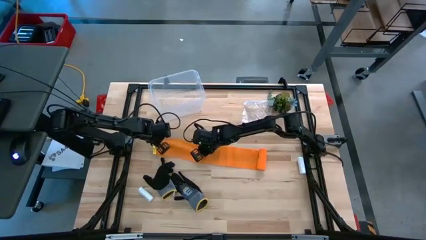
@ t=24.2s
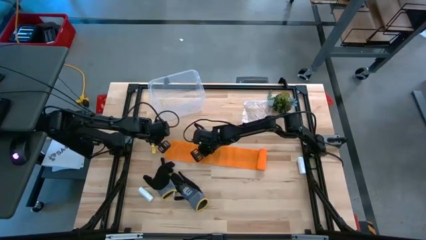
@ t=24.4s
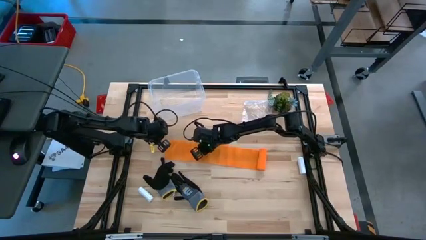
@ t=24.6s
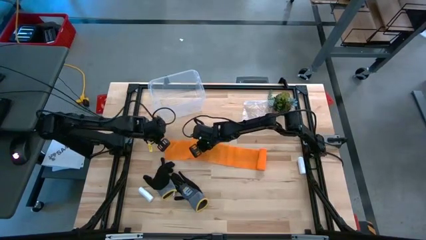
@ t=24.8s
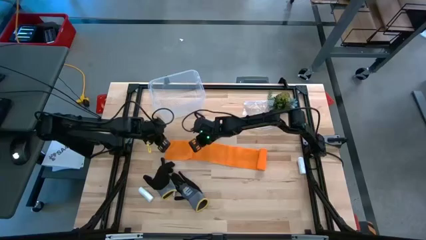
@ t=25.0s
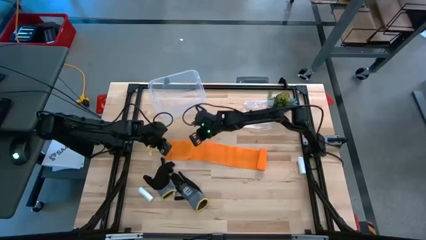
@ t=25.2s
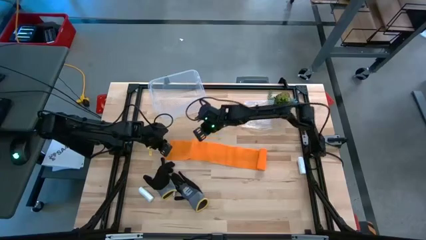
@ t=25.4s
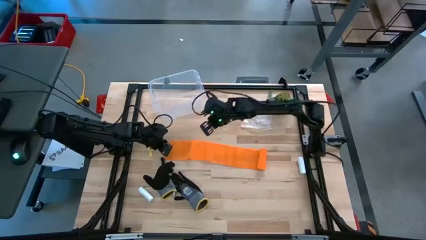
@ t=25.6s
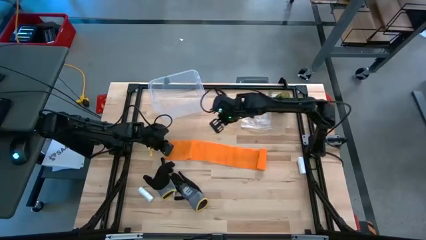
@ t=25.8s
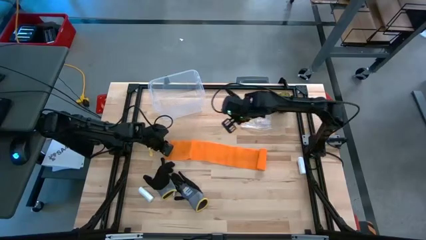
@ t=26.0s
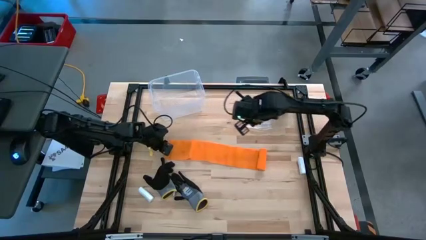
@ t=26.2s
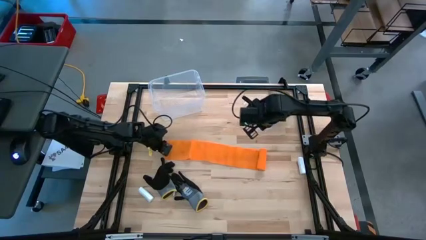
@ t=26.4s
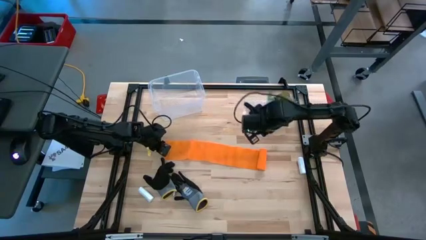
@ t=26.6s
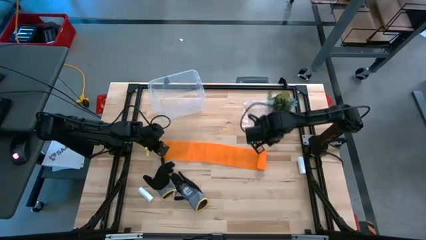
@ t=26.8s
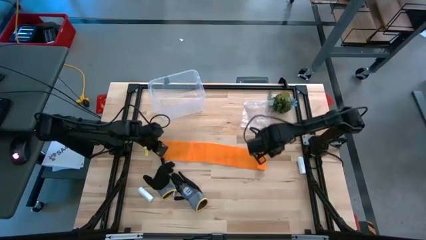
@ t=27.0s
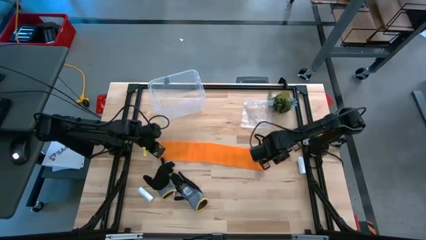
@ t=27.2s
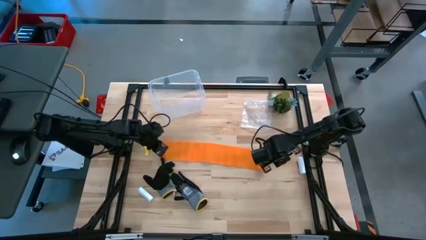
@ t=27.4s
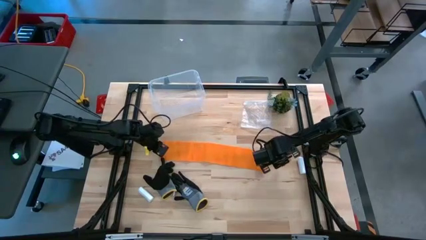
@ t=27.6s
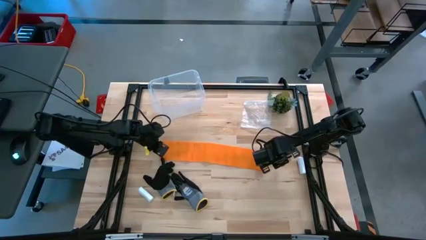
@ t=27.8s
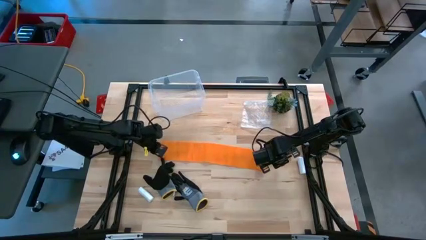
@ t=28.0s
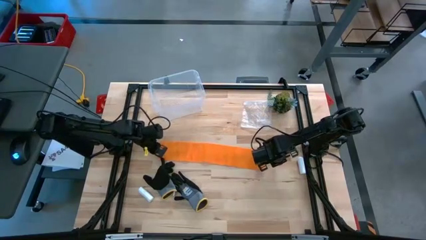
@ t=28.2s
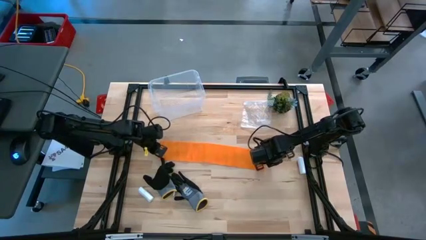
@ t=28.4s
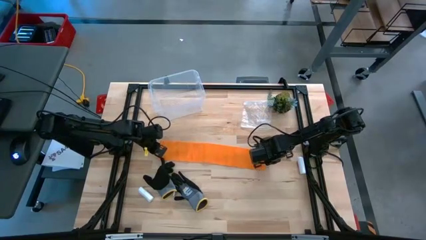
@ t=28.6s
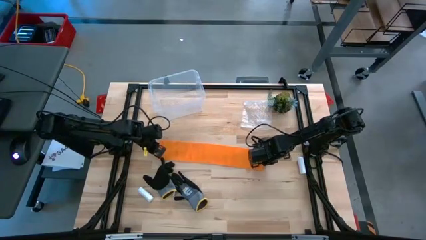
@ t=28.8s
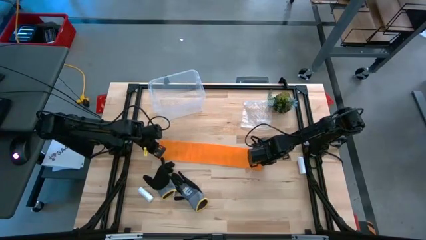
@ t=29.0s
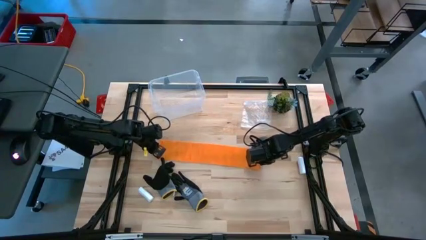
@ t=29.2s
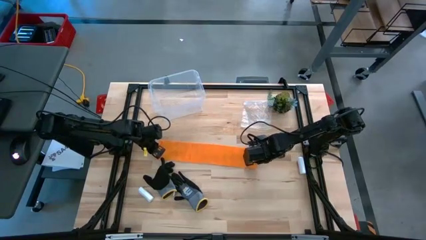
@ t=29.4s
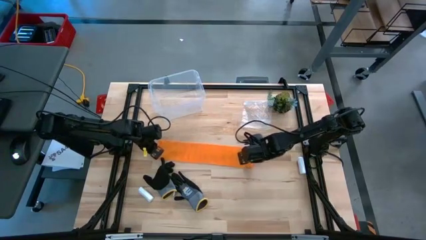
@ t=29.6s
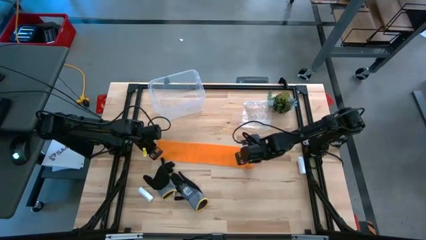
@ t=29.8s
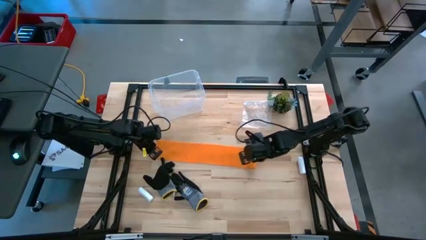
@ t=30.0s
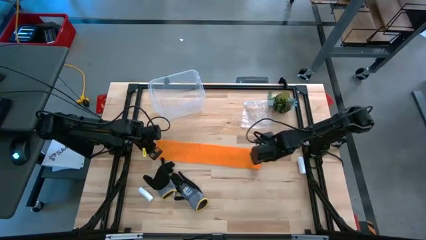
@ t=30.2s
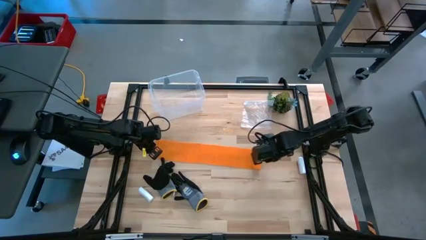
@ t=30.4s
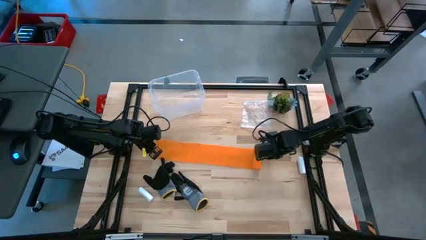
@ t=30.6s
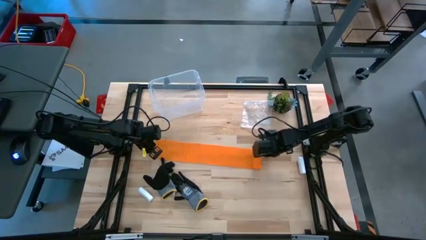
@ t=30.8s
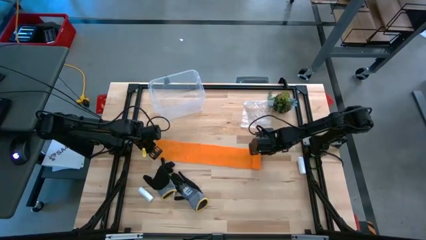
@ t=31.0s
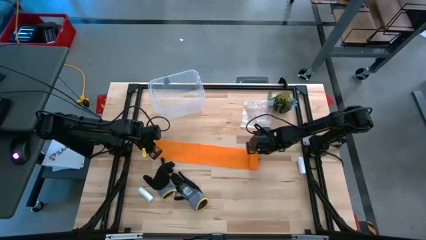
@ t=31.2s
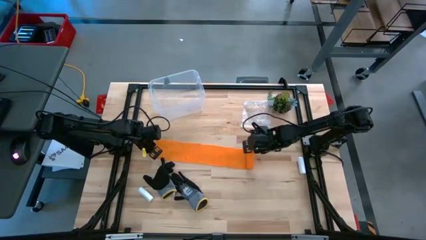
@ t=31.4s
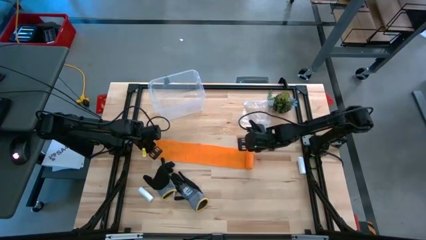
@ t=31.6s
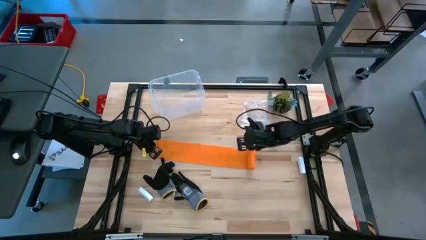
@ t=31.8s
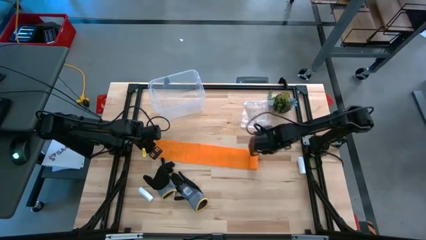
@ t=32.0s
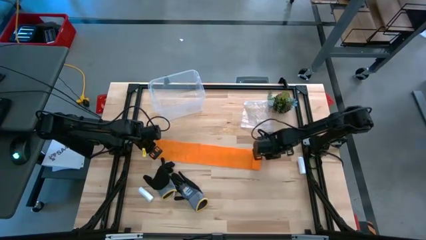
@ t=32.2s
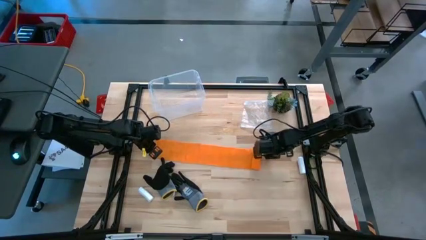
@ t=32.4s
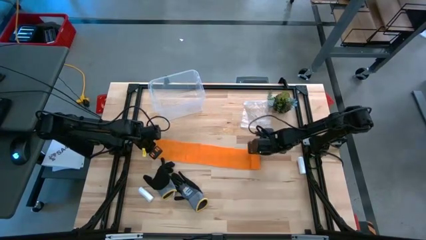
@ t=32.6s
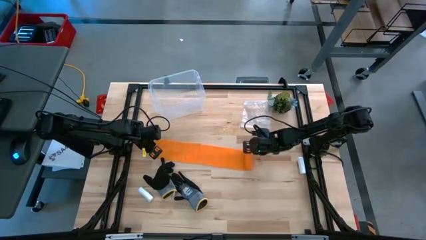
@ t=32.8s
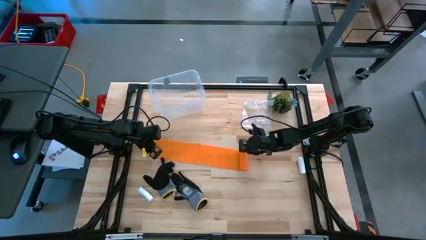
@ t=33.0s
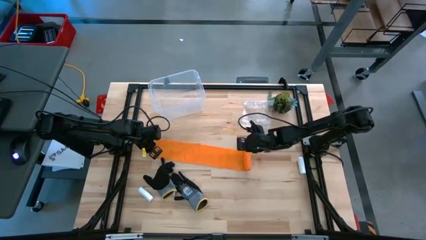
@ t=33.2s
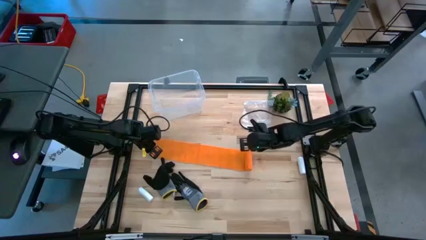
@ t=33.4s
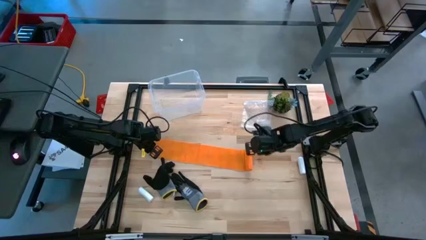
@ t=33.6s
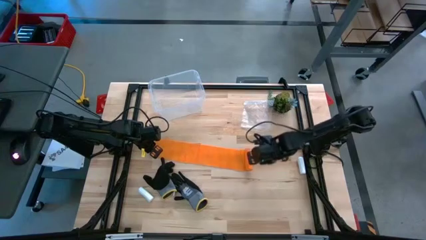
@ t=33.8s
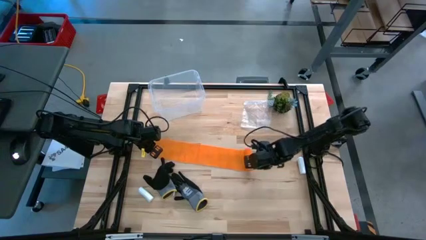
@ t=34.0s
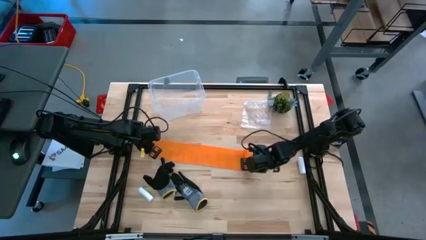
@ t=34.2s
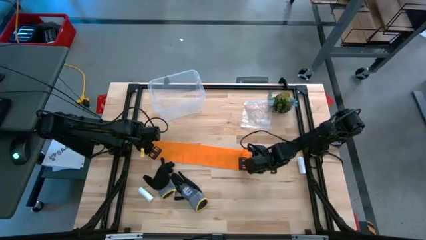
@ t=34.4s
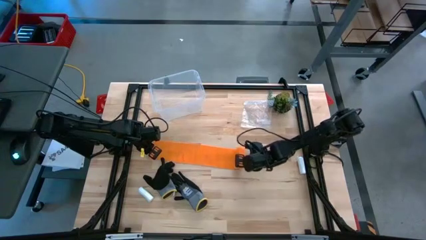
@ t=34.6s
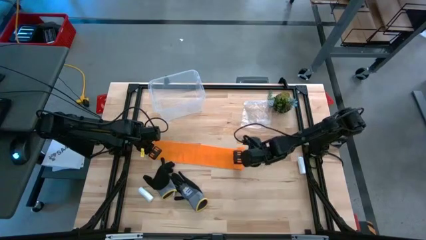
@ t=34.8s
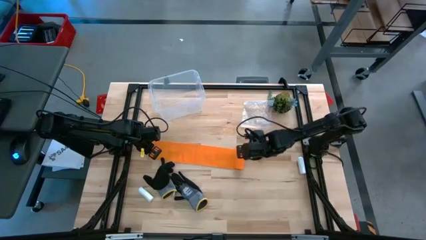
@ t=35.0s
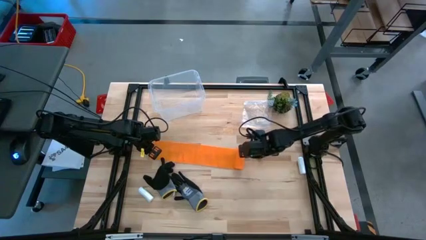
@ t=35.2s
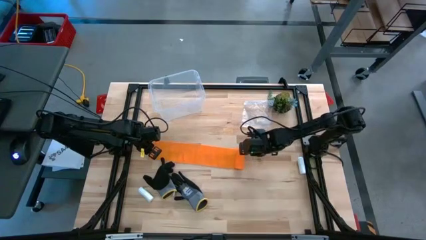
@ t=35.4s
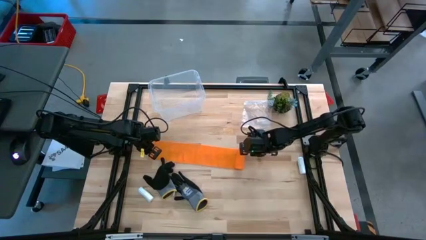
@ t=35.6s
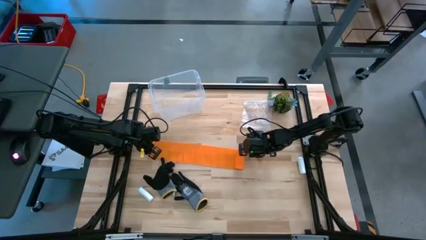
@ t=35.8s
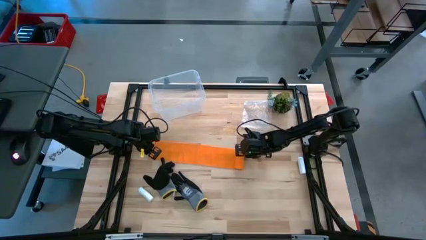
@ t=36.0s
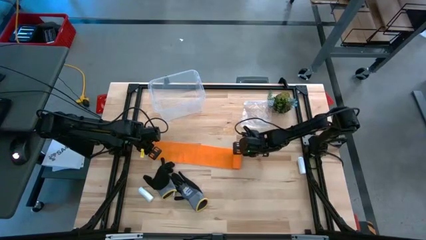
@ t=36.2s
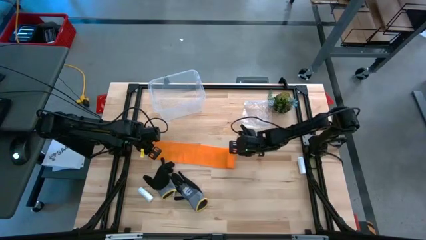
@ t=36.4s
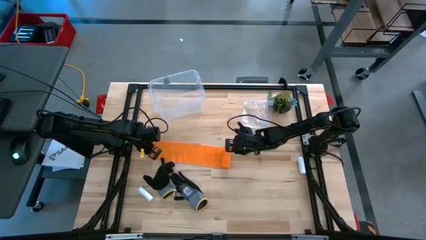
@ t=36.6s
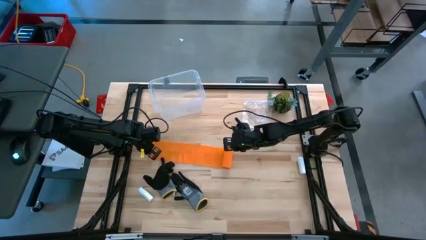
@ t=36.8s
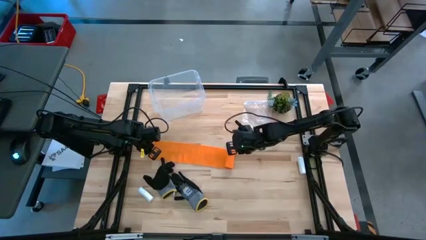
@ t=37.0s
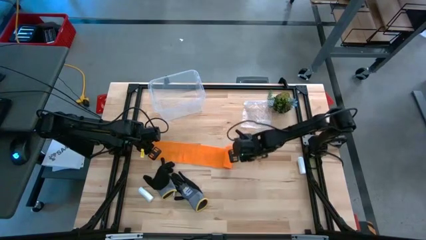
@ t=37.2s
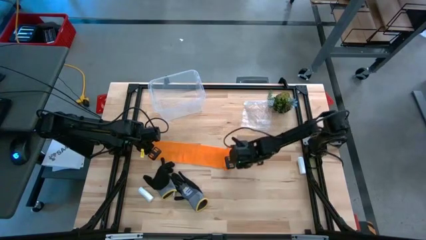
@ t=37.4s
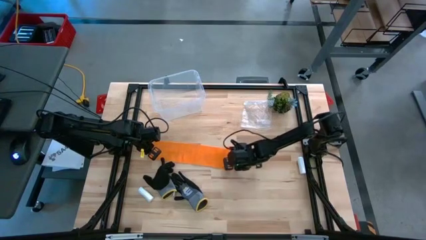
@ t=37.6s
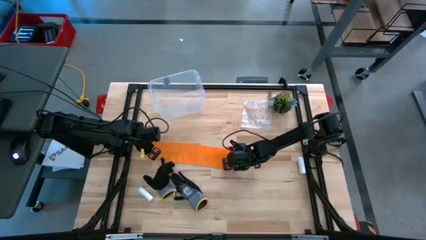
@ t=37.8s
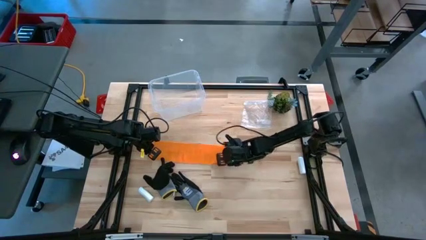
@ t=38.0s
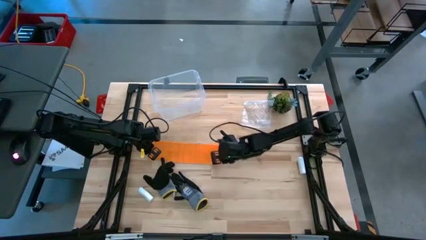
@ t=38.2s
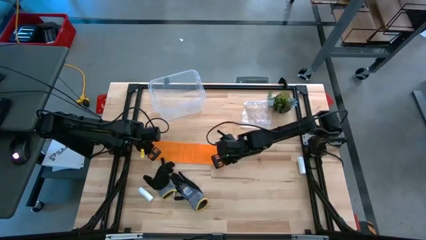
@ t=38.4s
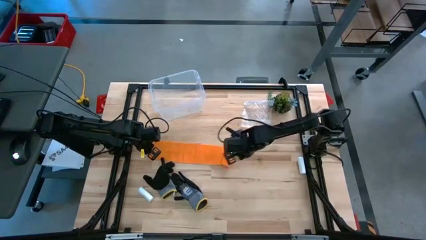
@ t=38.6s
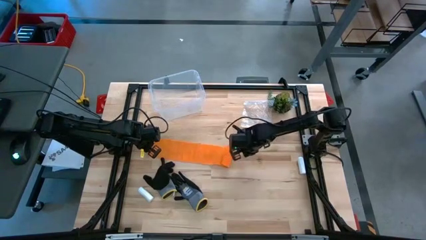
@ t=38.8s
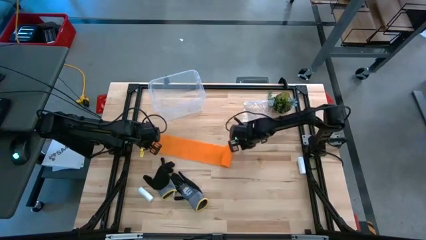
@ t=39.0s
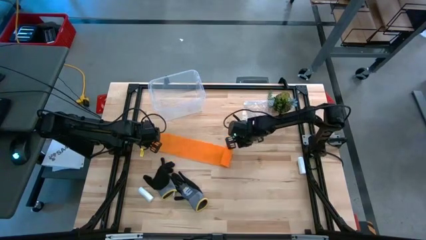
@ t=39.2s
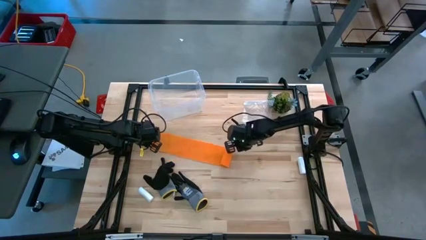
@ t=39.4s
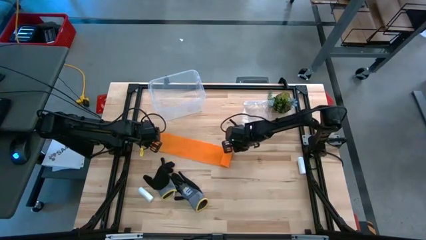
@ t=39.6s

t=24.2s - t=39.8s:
Task: Roll bandage
Roll the orange bandage

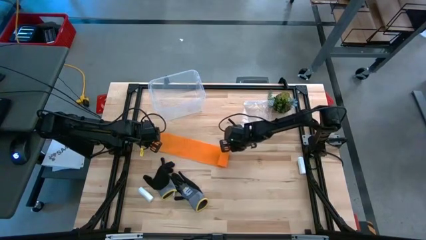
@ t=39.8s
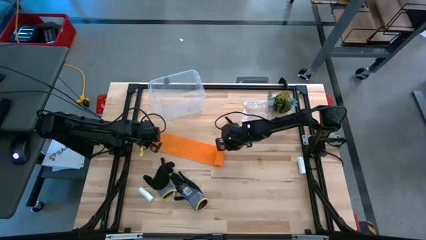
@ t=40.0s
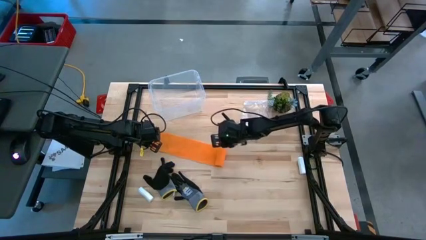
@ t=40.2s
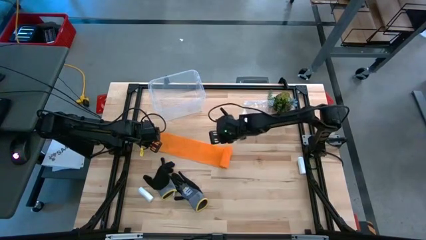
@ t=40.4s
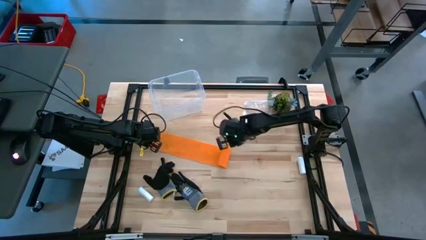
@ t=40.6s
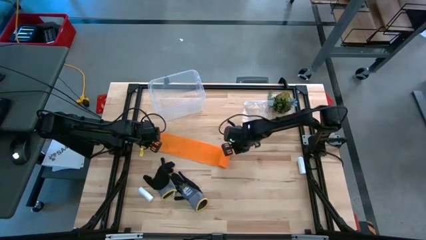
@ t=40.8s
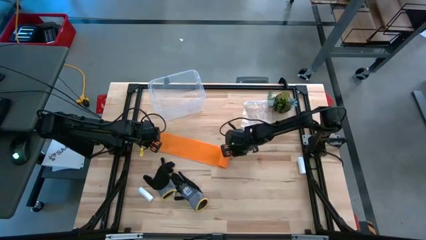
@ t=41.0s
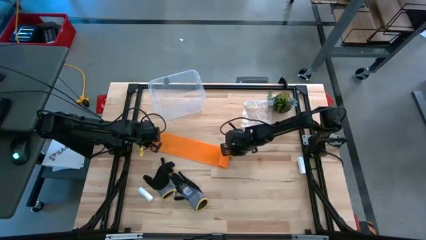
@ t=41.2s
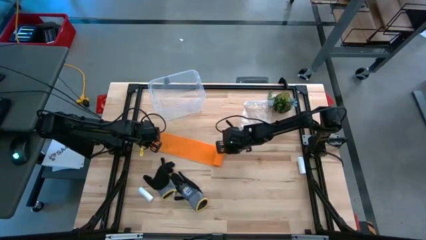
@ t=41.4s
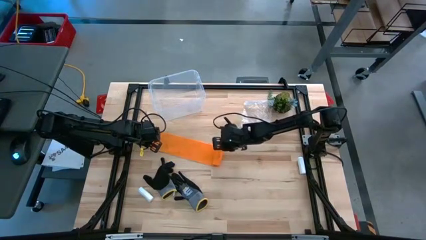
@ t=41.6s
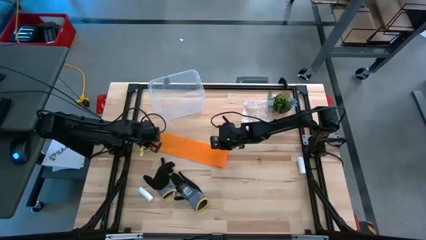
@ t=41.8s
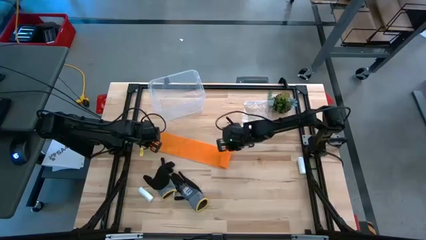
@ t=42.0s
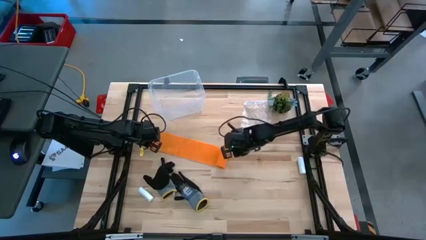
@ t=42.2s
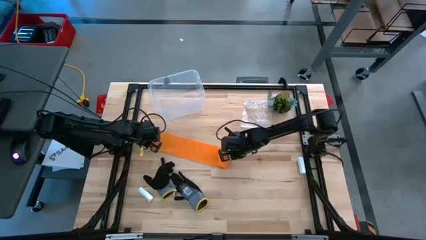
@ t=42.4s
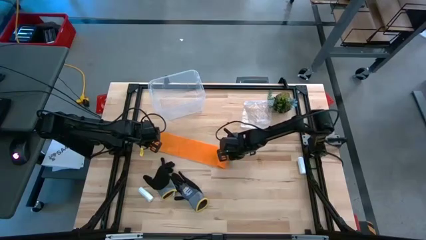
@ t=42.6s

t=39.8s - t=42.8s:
Roll the orange bandage
